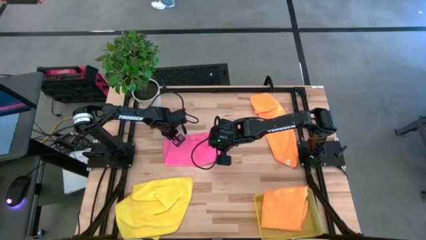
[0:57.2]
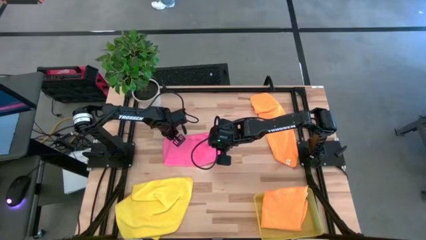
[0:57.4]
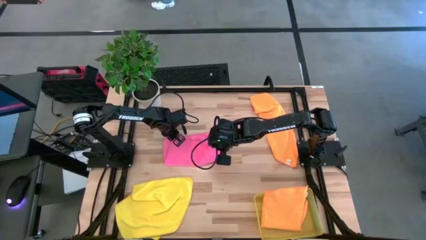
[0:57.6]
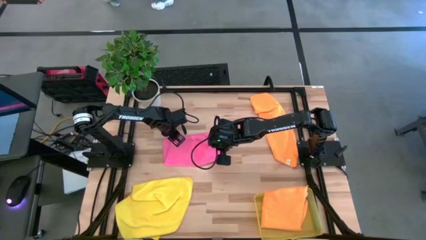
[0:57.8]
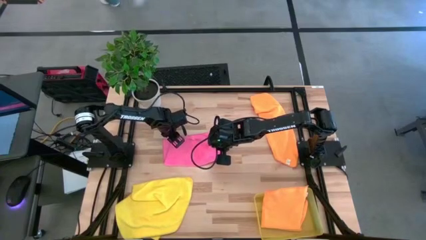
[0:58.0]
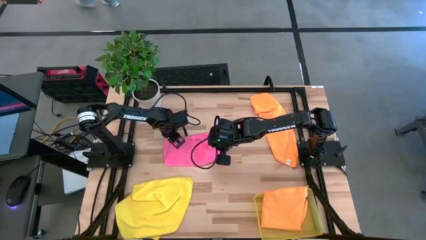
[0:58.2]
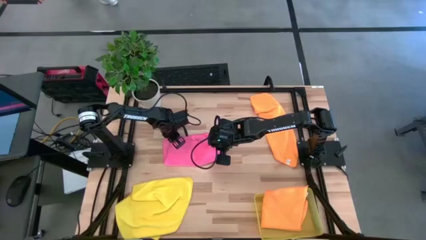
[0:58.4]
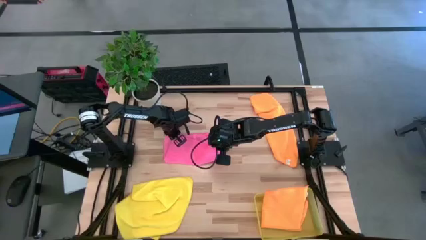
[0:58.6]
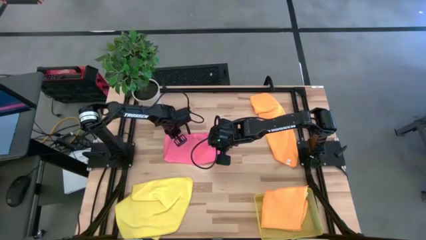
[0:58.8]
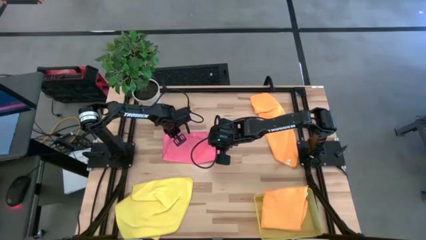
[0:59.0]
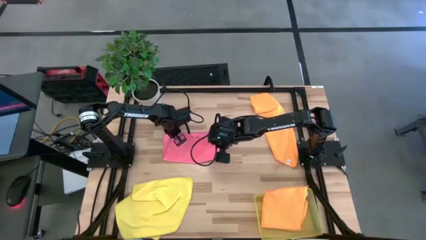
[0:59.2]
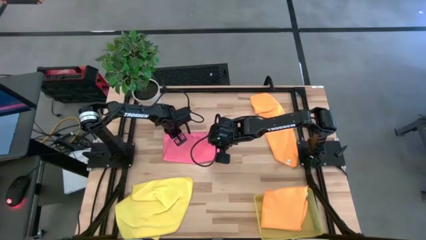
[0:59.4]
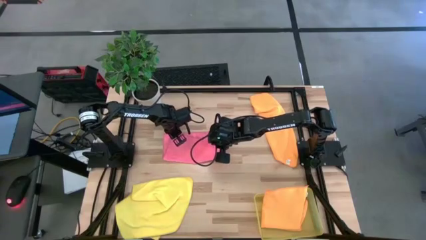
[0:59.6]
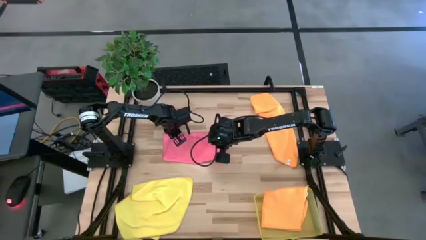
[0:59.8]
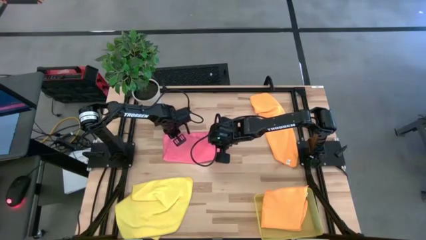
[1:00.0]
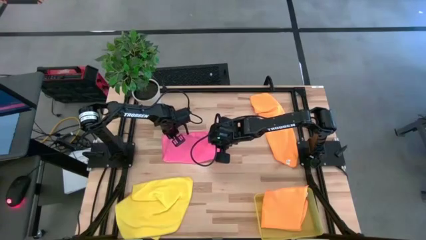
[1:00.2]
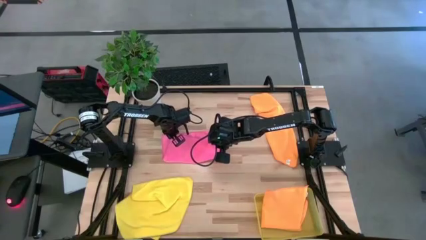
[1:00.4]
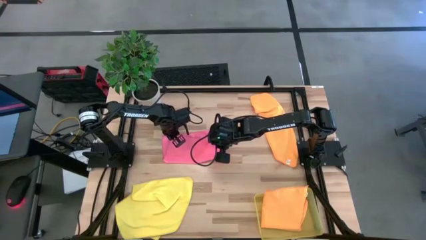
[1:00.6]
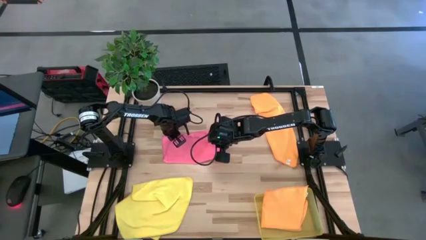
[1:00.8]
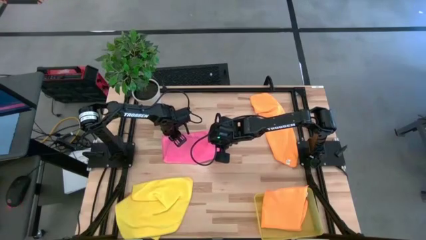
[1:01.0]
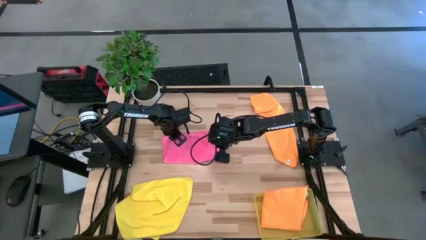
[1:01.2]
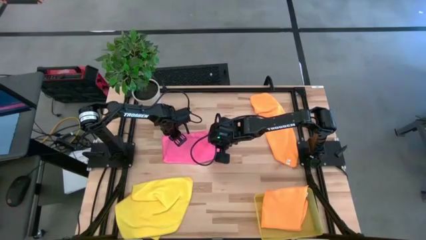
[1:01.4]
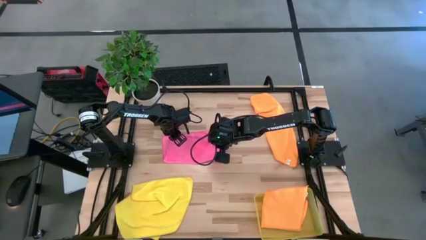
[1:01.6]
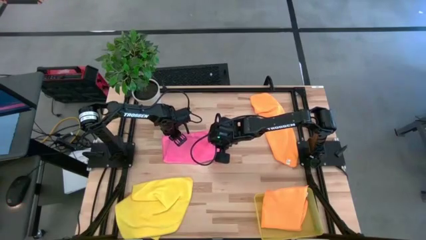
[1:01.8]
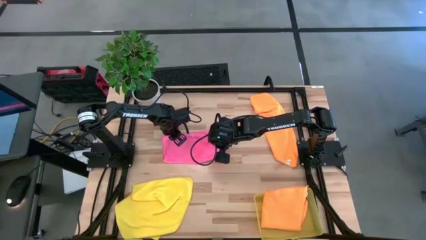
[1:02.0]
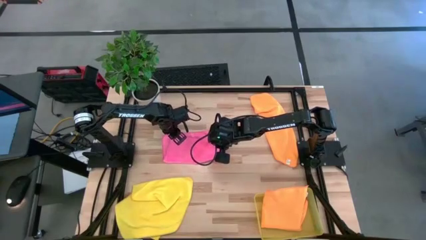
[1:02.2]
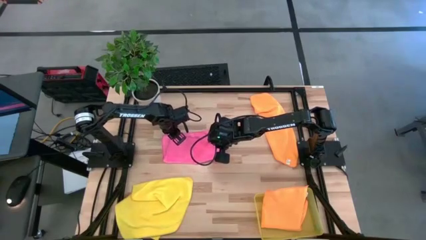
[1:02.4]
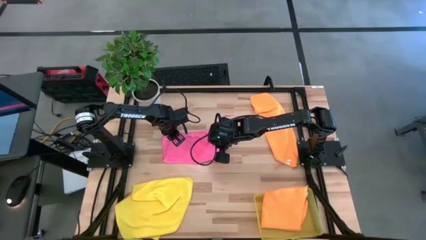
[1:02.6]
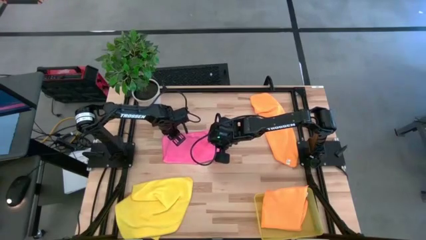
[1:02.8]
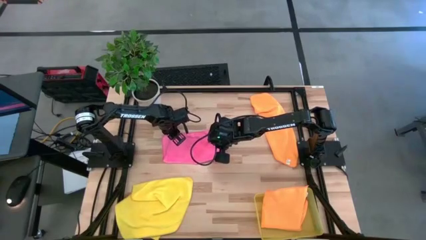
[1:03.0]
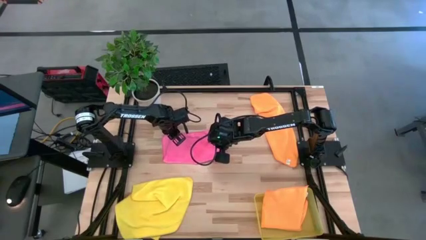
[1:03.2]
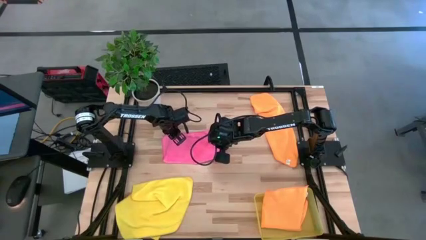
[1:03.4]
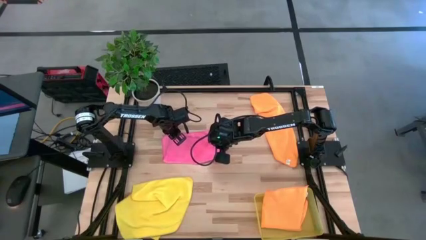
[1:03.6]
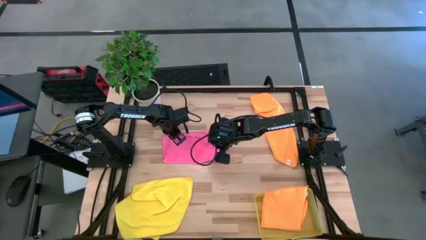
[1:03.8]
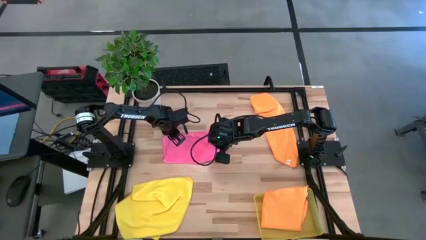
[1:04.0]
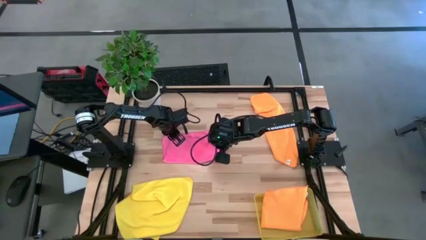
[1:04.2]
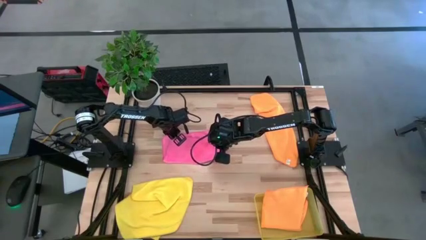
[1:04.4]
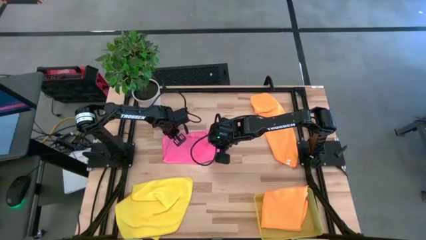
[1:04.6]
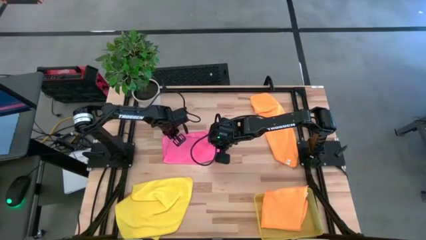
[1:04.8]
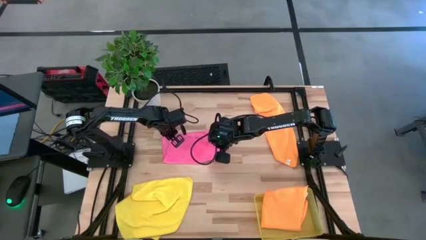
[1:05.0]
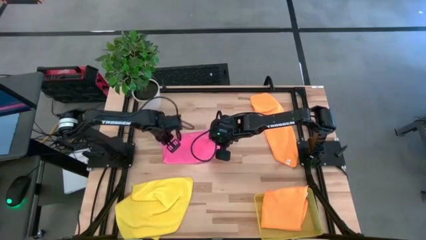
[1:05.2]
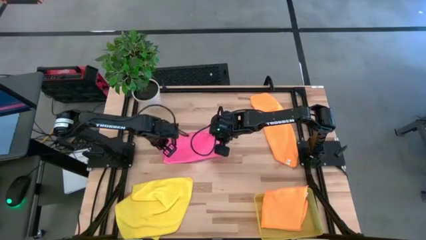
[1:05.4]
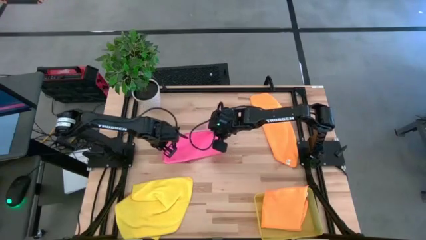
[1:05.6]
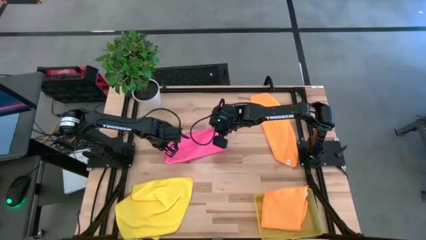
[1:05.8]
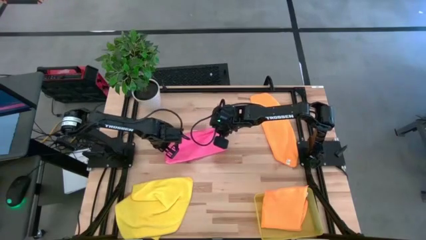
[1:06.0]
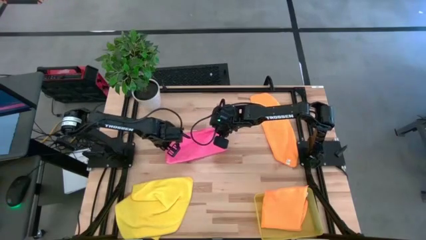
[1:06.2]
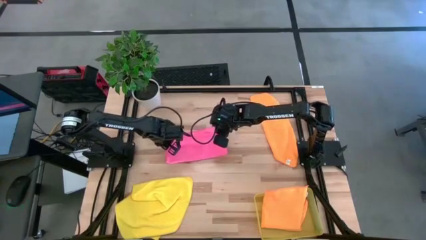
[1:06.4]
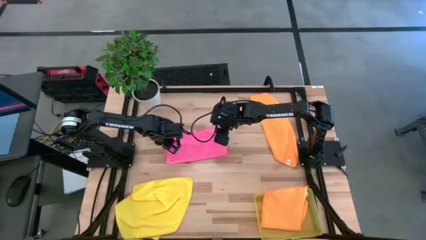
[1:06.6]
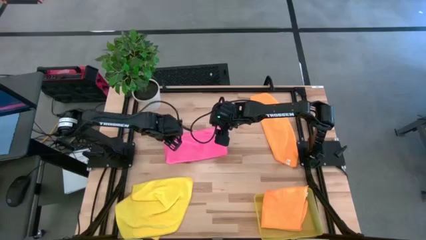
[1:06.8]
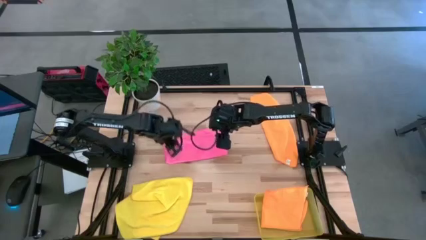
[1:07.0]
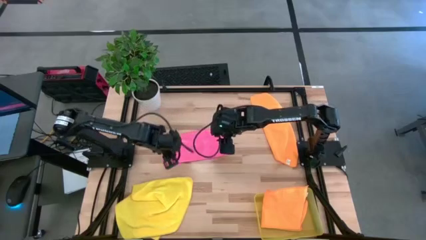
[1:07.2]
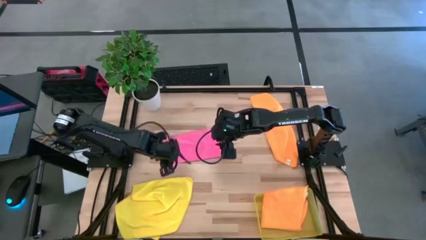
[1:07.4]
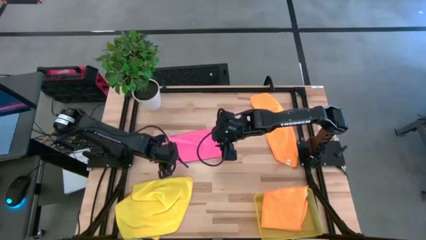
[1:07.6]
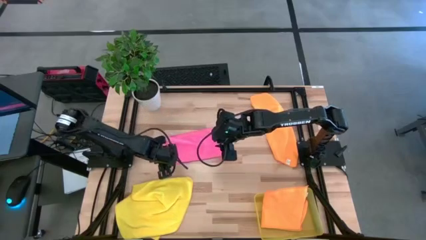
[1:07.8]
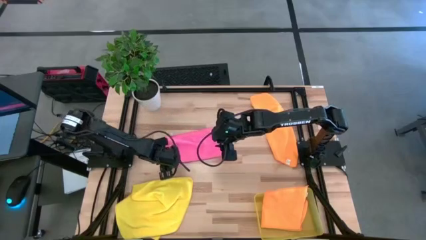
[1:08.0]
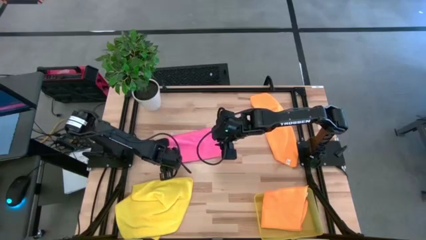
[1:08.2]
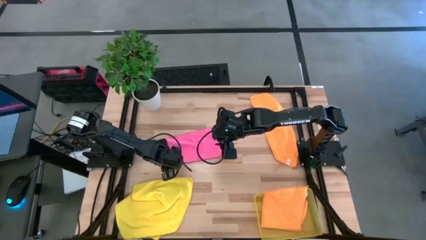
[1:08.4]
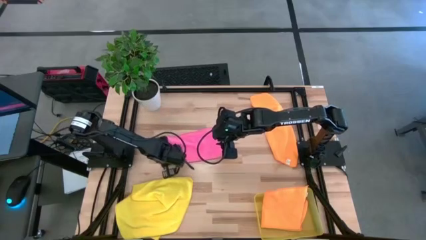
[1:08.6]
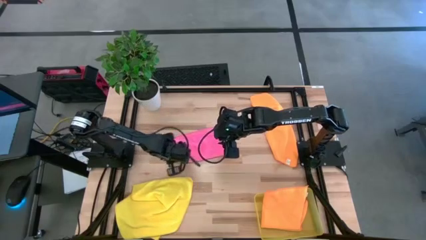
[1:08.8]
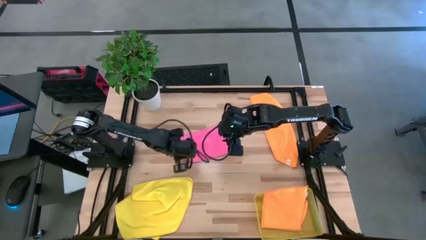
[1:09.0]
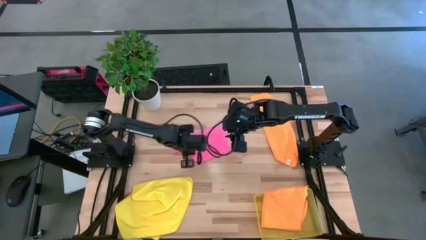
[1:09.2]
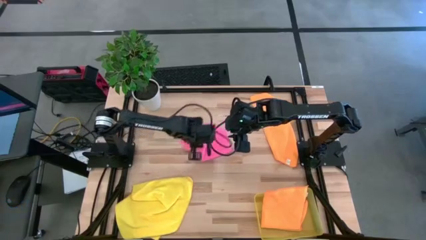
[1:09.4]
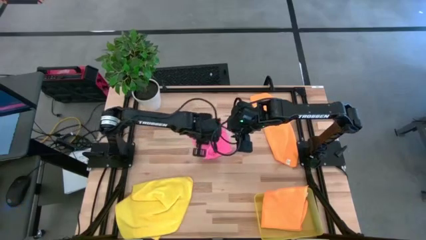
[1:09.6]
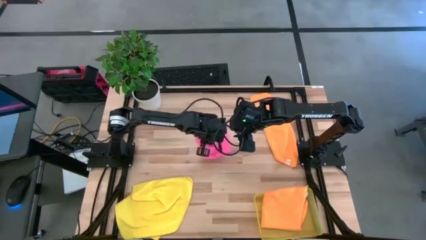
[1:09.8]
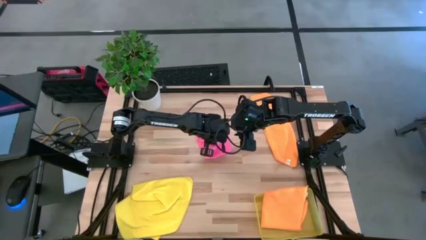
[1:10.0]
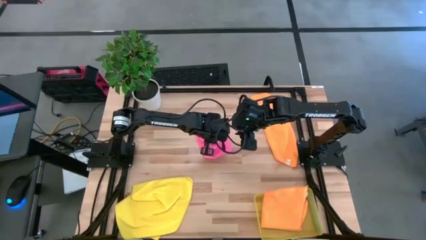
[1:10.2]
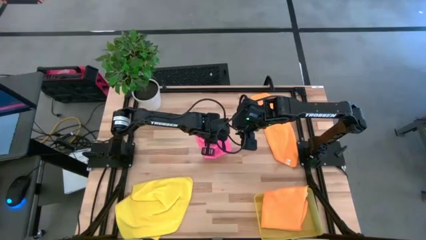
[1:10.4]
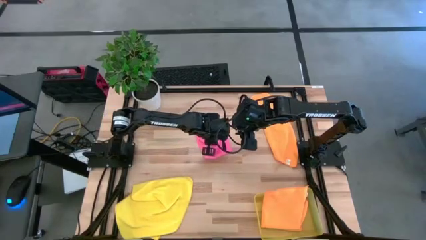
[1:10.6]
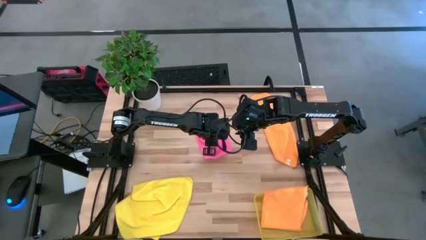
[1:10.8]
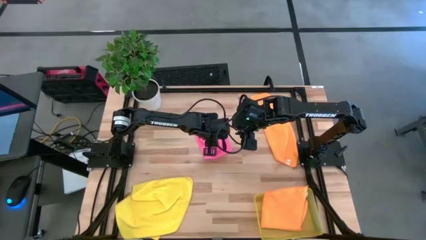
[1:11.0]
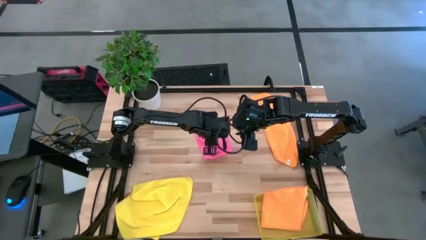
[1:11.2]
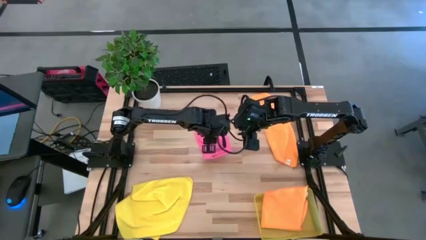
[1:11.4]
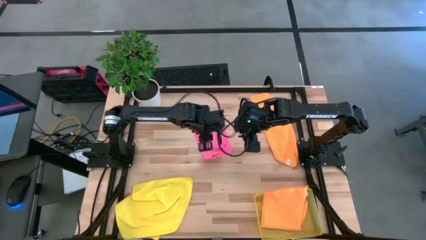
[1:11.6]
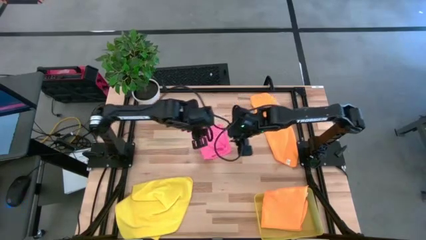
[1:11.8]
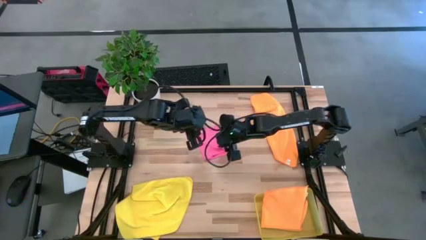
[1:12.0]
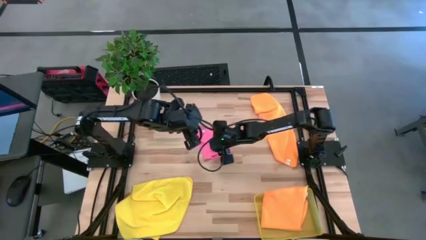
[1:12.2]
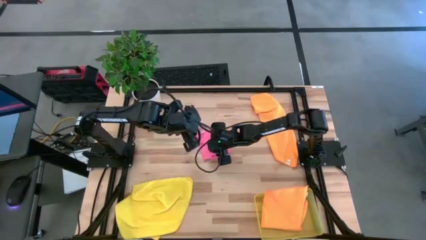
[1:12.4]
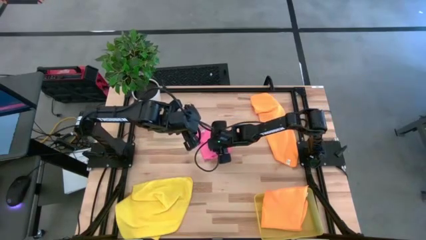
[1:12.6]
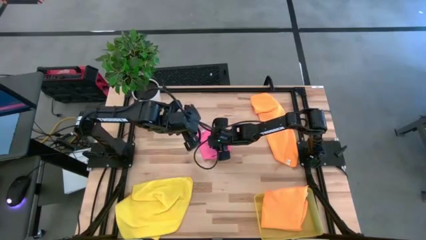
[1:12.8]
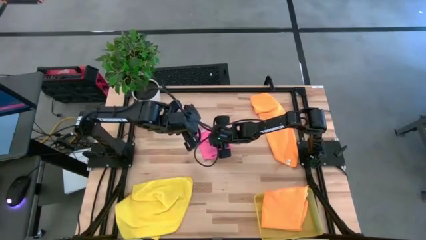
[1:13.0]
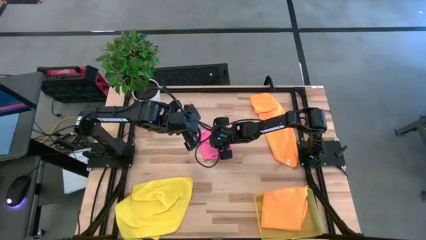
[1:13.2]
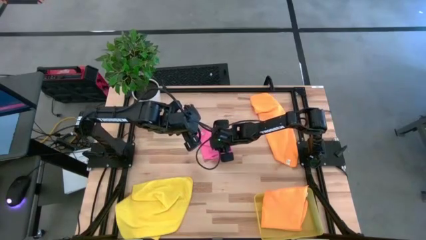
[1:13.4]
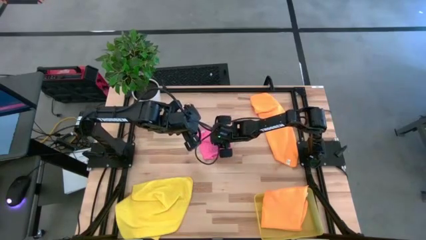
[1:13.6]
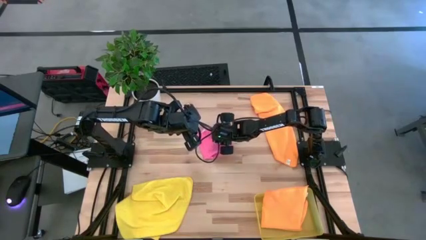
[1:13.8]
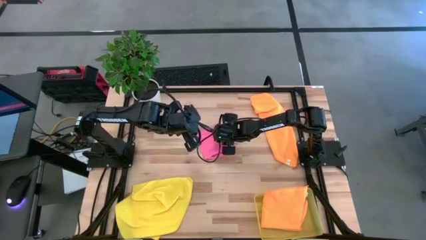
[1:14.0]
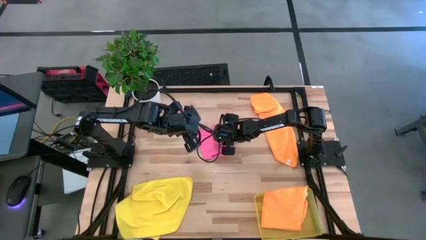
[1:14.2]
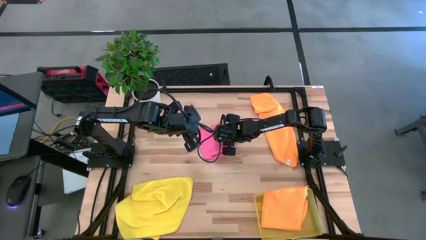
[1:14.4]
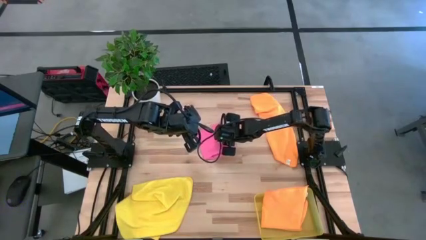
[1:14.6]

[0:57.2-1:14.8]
Task: Fold microfiber towels
Fold the pink microfiber cloth
